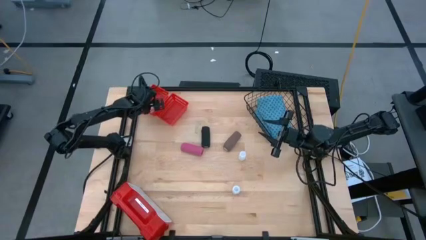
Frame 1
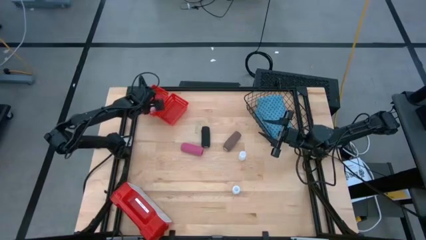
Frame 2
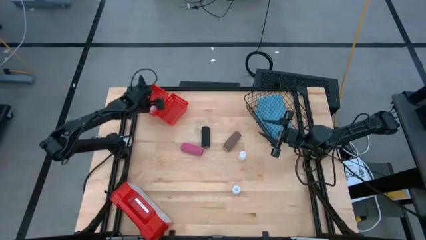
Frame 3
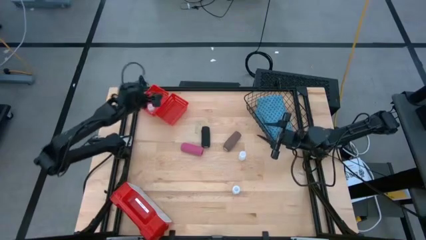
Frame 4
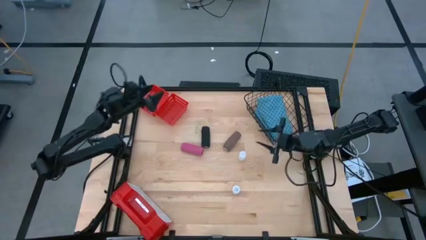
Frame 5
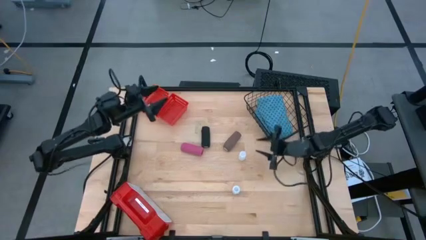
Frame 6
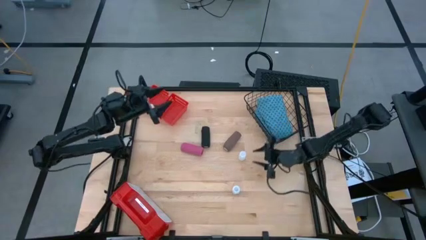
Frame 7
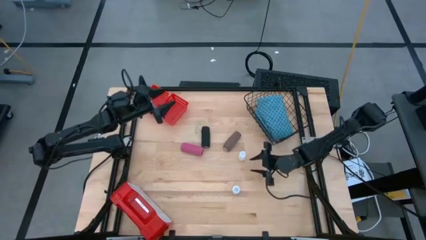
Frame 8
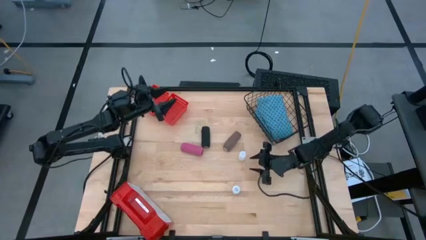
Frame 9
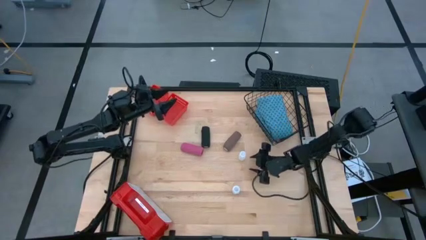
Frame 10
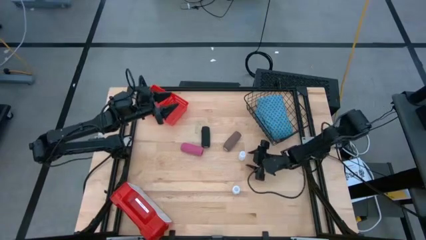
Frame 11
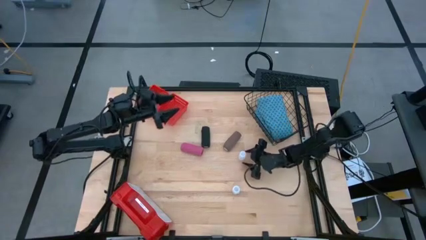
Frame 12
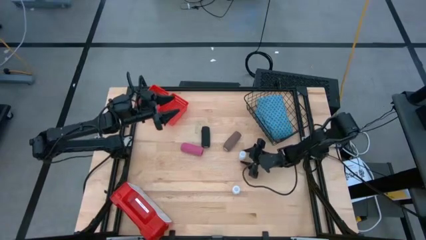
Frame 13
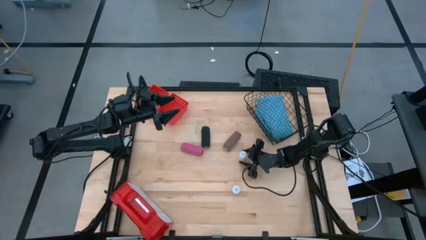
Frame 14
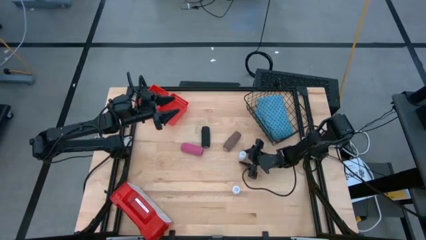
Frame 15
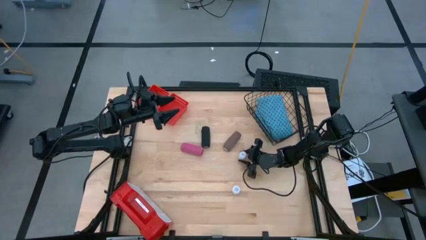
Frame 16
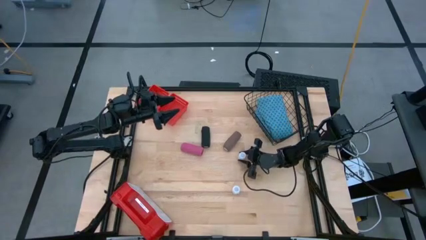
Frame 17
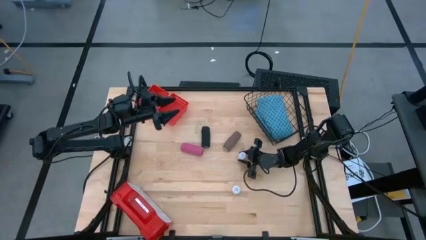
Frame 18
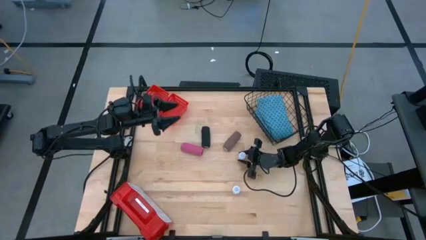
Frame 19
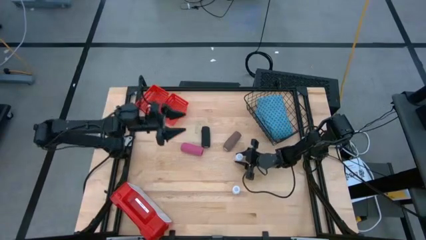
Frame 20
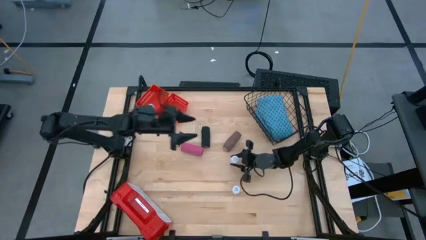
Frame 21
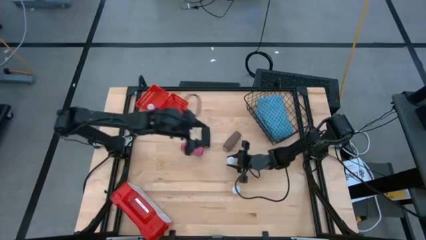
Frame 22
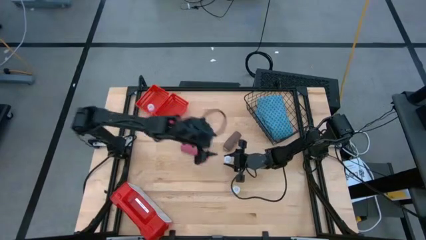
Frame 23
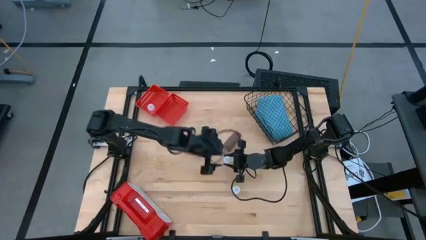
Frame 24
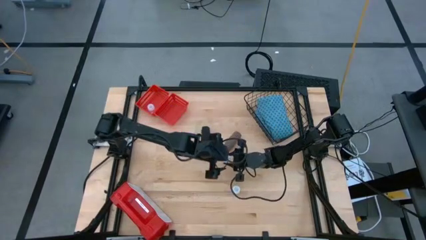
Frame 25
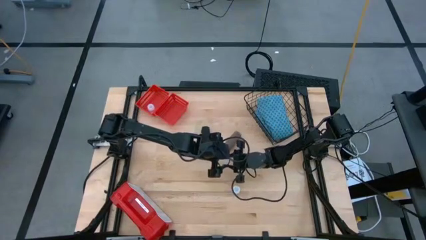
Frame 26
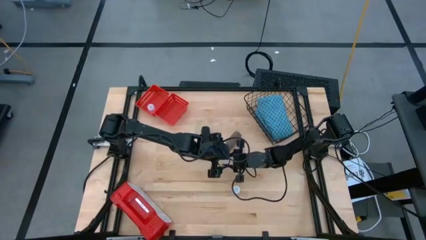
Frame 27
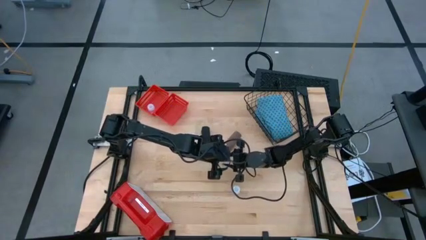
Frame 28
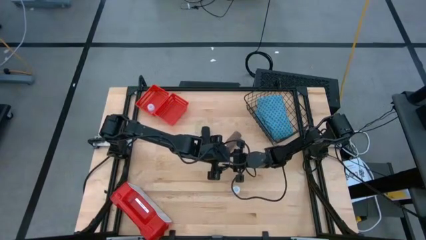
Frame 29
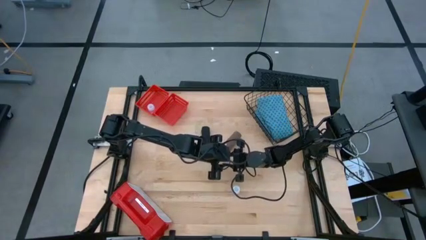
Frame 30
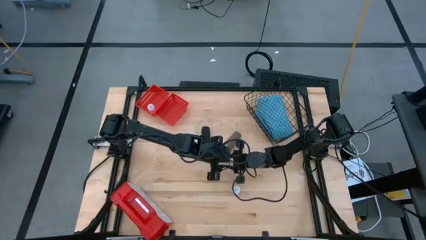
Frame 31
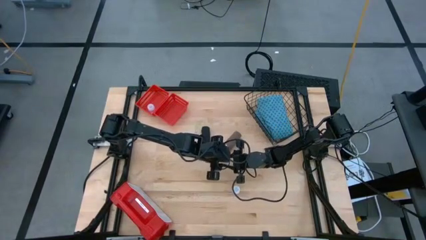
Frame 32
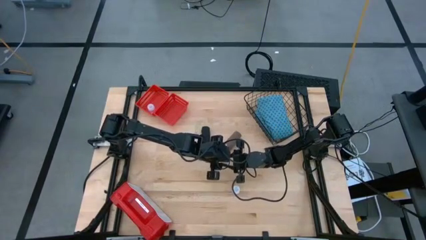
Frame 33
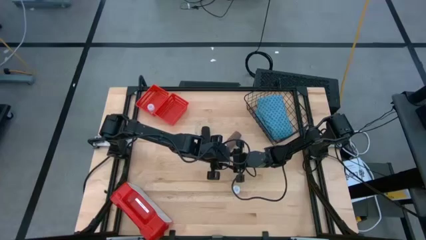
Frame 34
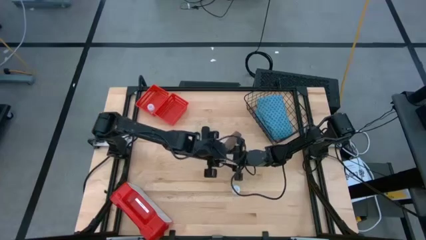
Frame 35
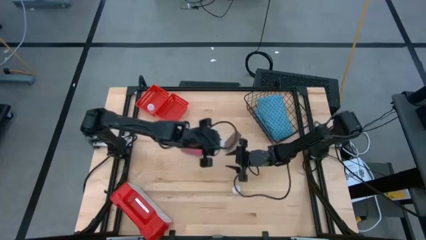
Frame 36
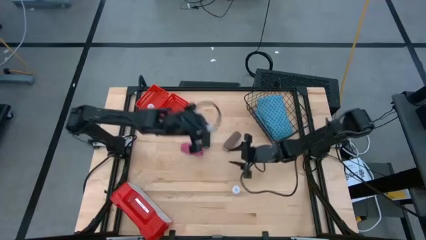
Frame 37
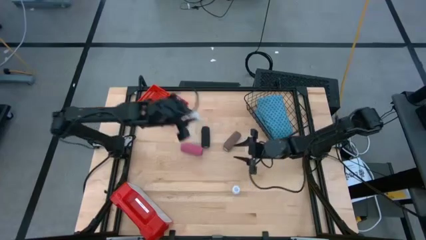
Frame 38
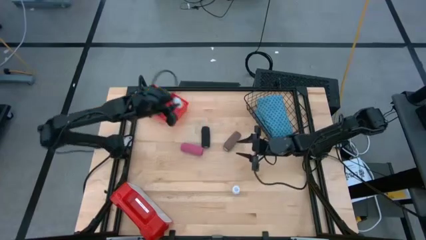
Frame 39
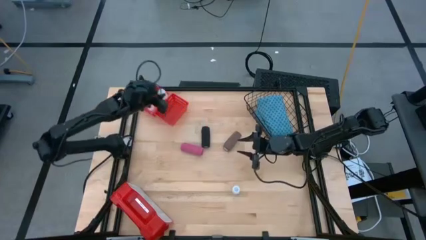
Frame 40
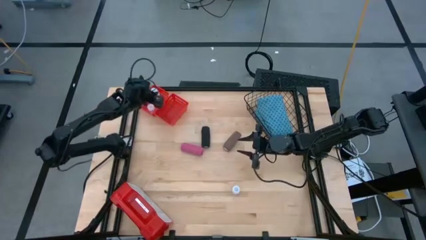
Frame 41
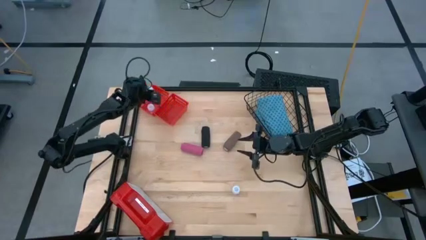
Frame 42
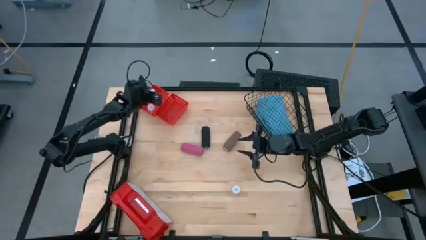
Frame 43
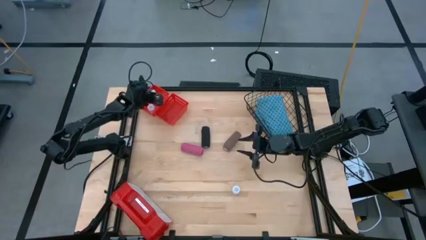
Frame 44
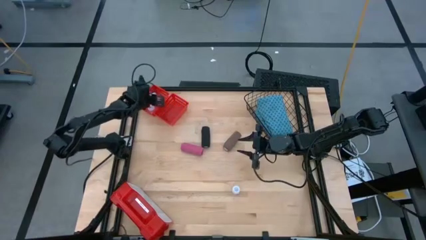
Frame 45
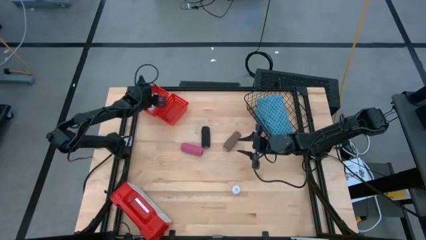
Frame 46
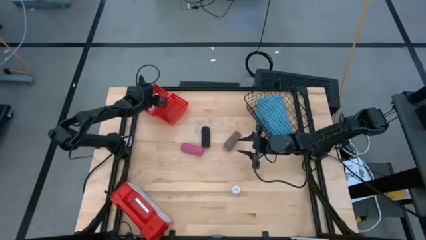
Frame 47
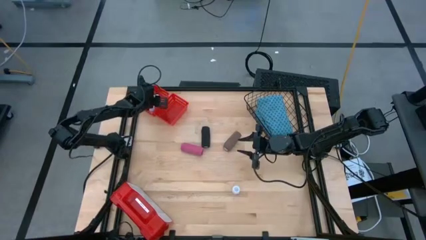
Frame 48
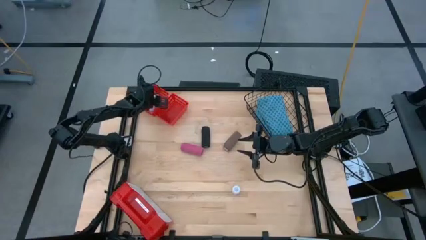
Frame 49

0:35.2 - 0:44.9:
Task: Pick & place medical supplies in basket/bin
Put the top transparent pill bottle into the left red bin

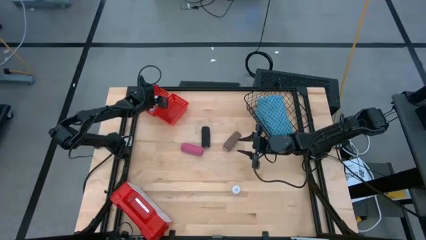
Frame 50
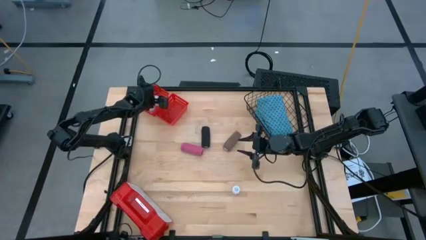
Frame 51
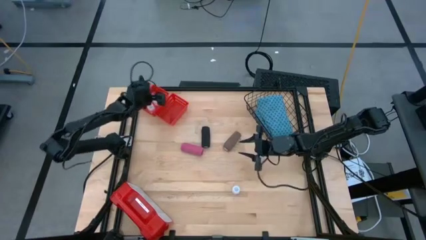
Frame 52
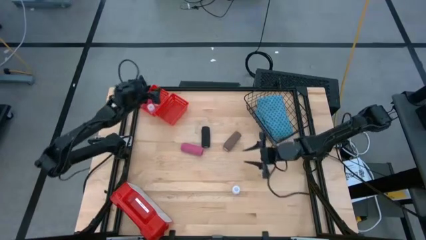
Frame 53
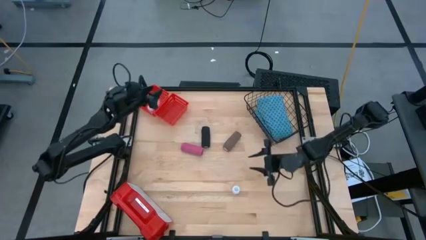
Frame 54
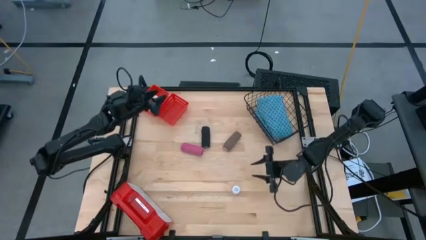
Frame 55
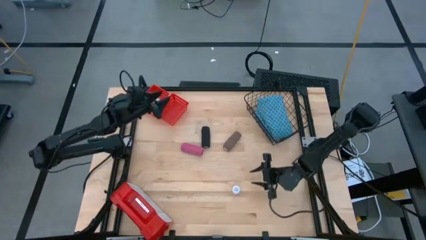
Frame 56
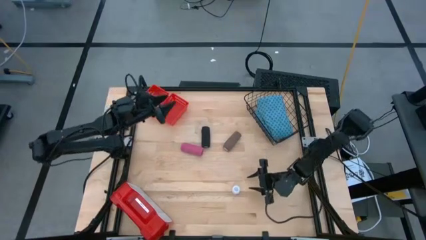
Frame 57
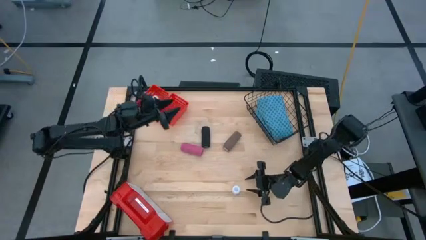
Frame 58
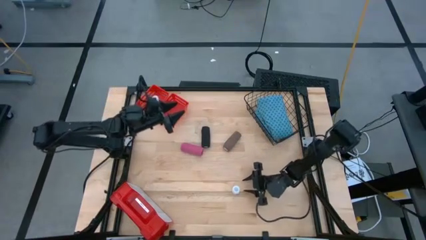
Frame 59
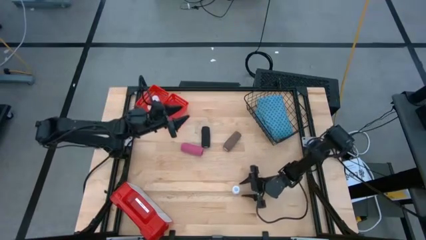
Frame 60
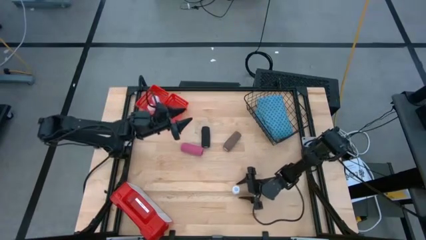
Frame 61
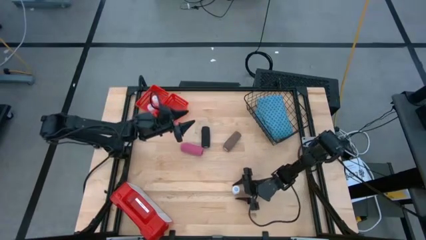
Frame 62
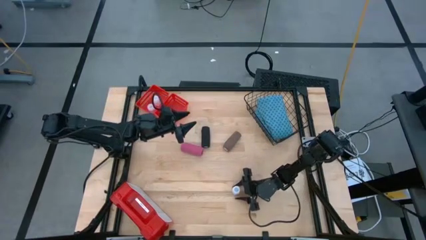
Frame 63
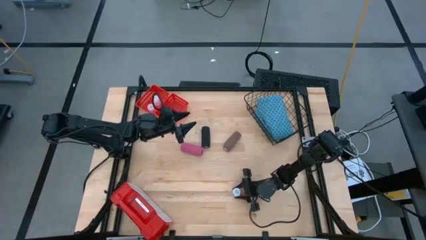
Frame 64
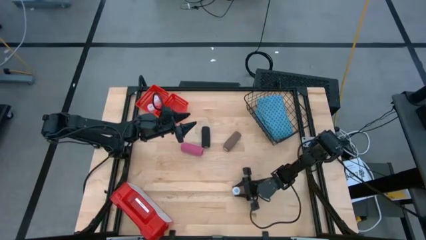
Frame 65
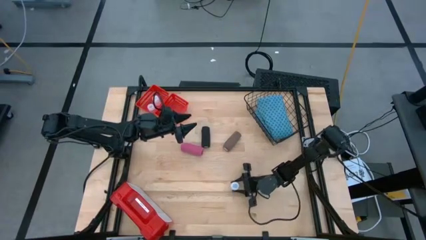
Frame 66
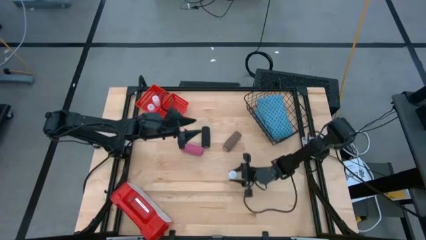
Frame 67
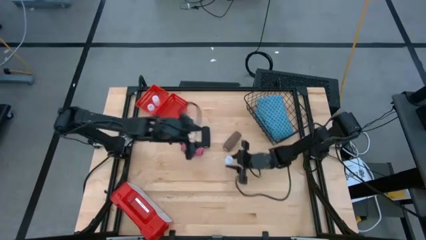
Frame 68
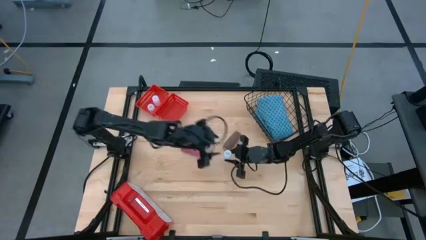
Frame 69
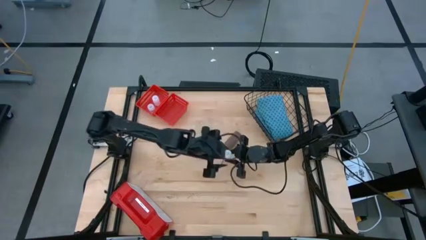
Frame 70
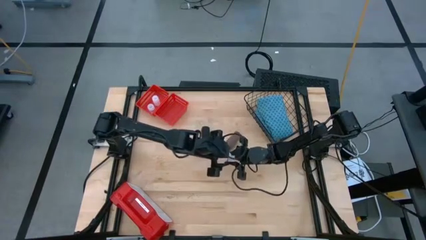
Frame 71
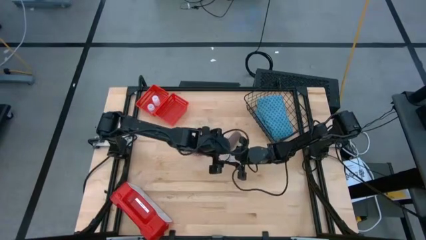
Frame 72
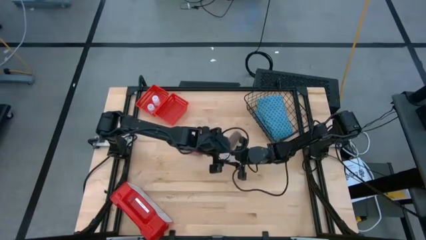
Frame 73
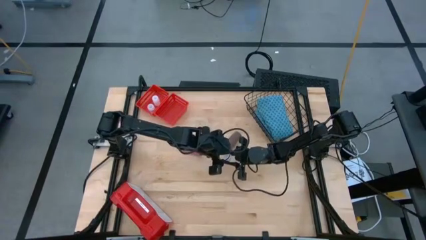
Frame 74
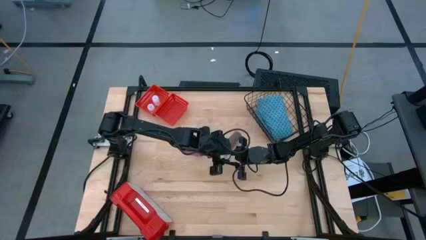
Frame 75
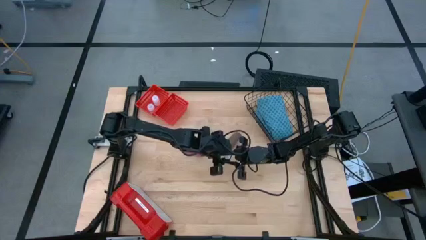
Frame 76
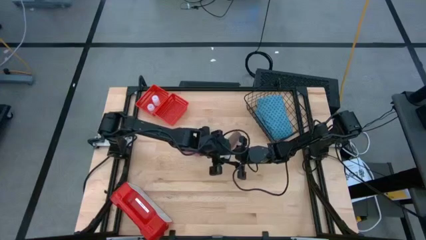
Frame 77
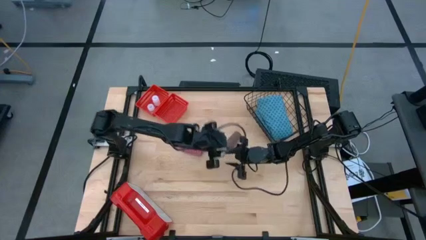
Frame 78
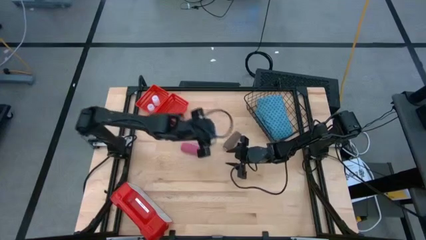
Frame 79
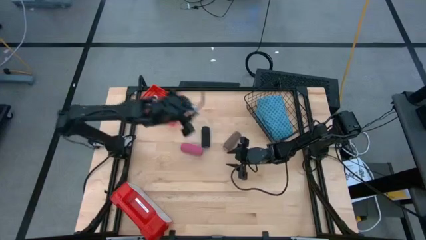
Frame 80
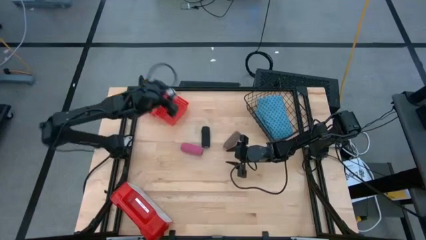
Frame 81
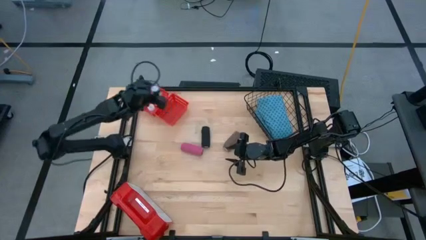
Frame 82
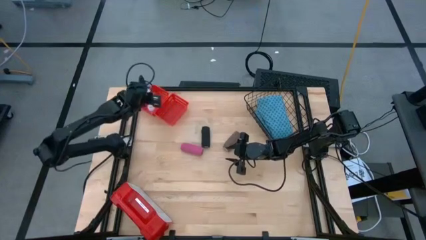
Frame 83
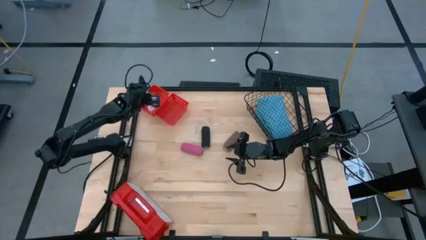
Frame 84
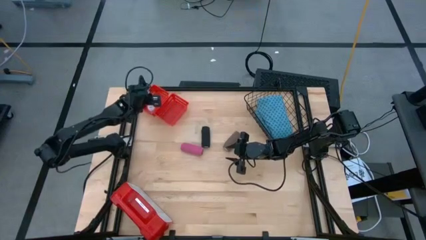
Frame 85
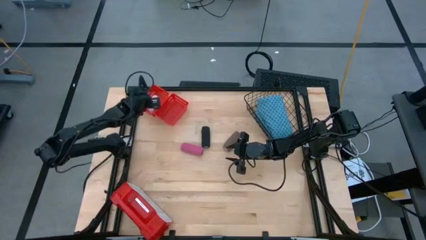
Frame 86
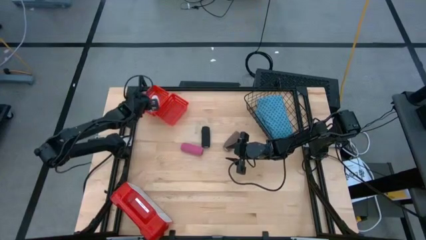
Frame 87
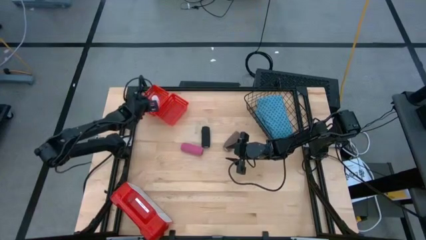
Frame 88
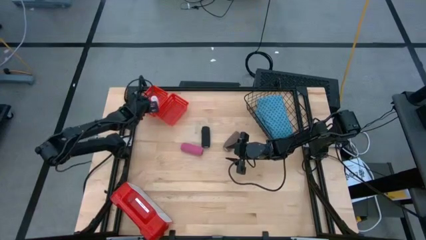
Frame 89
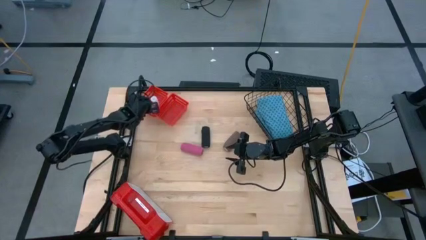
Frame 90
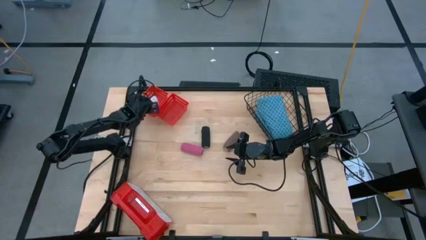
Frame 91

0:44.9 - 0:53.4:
Put the transparent pill bottle into the left red bin
